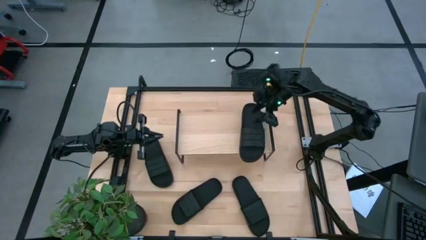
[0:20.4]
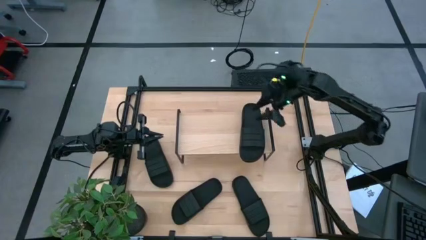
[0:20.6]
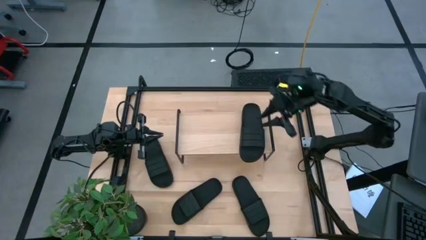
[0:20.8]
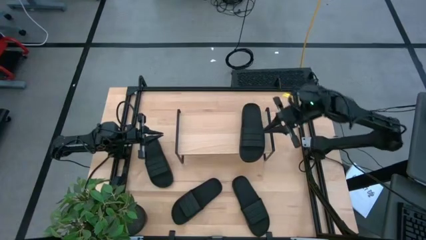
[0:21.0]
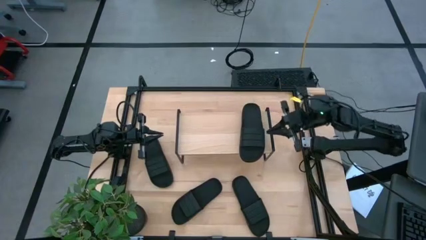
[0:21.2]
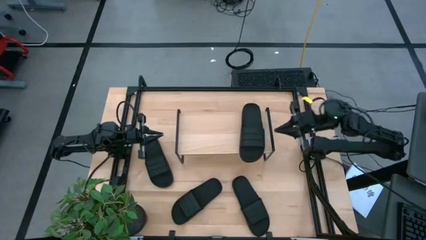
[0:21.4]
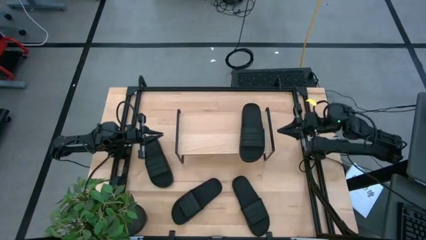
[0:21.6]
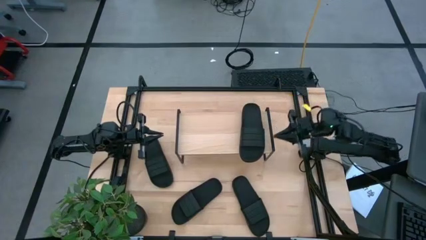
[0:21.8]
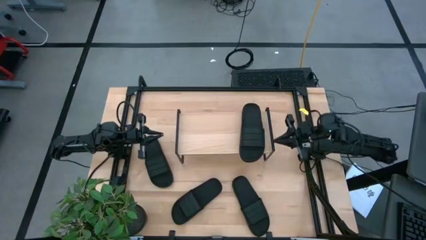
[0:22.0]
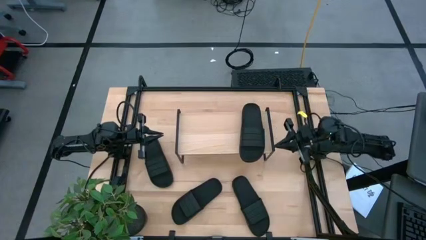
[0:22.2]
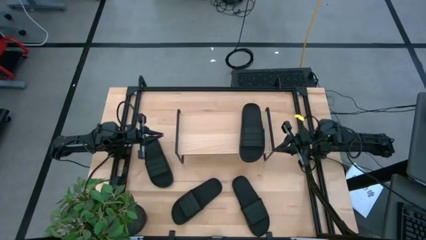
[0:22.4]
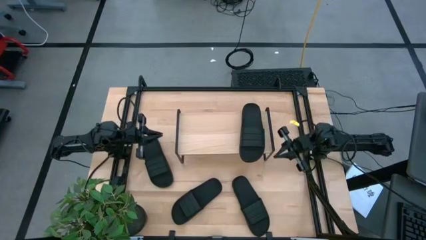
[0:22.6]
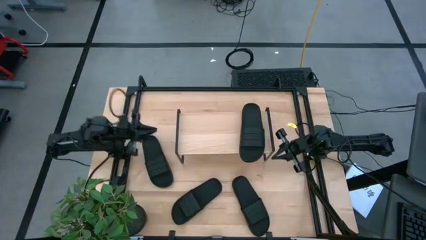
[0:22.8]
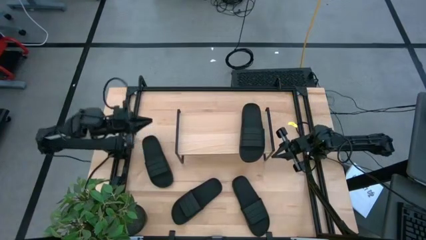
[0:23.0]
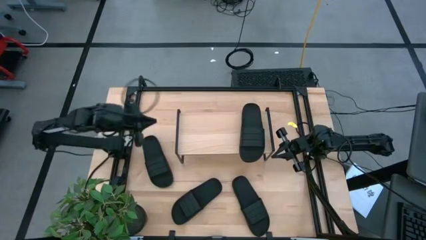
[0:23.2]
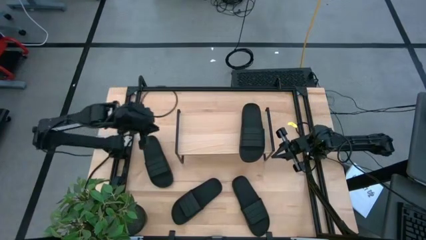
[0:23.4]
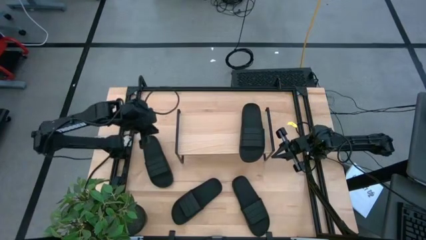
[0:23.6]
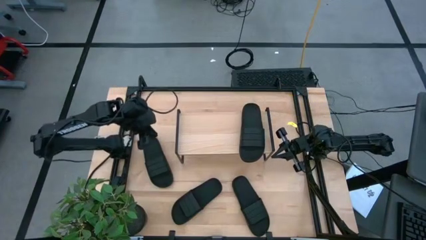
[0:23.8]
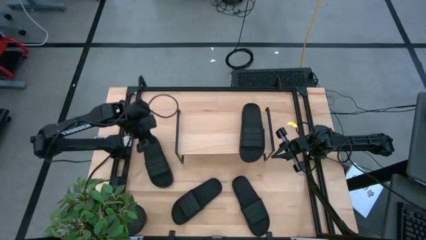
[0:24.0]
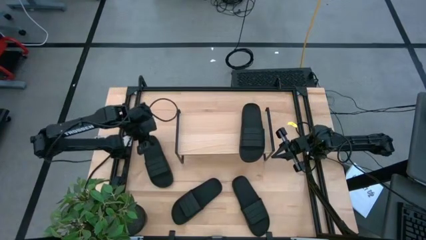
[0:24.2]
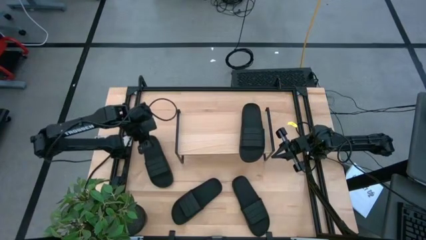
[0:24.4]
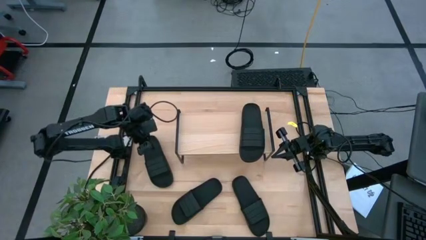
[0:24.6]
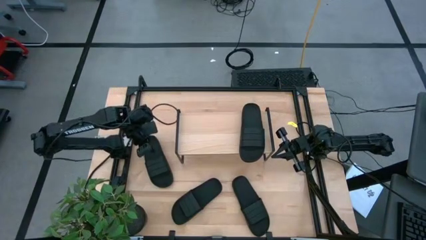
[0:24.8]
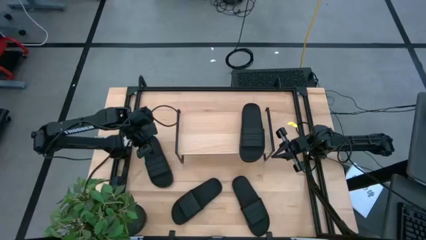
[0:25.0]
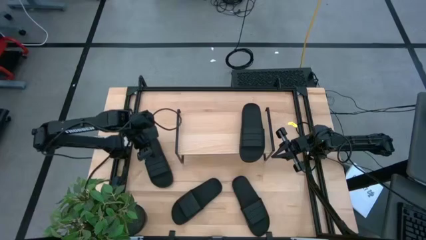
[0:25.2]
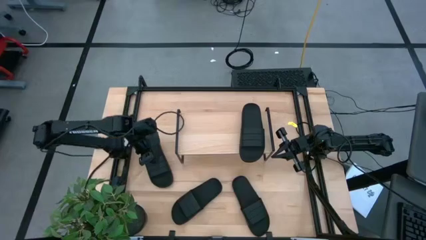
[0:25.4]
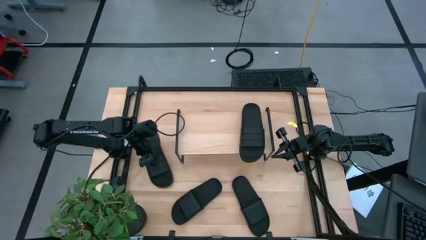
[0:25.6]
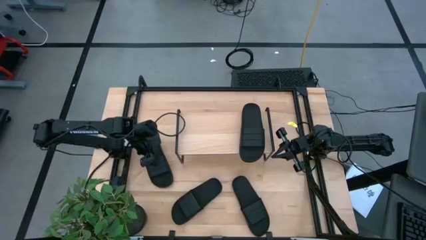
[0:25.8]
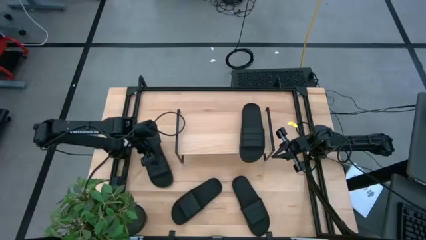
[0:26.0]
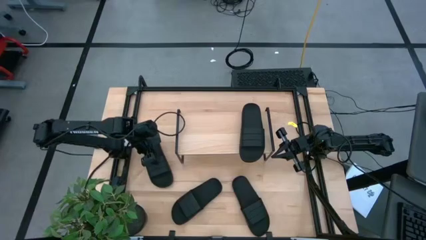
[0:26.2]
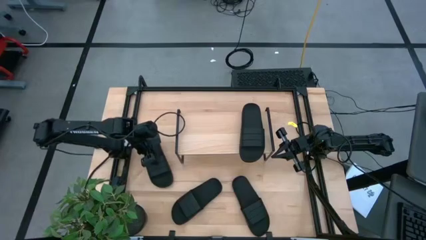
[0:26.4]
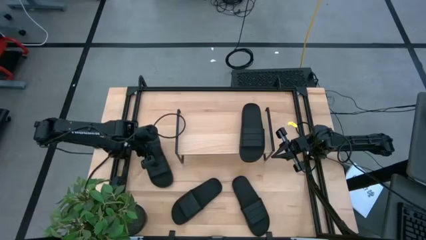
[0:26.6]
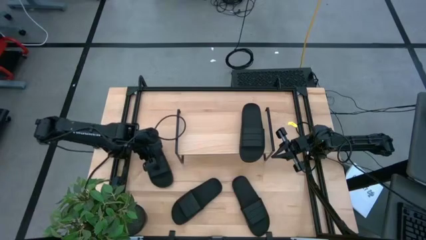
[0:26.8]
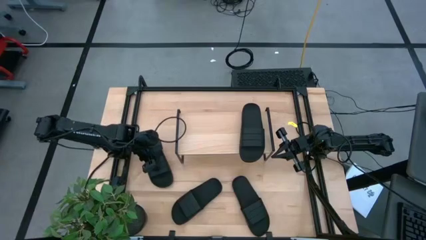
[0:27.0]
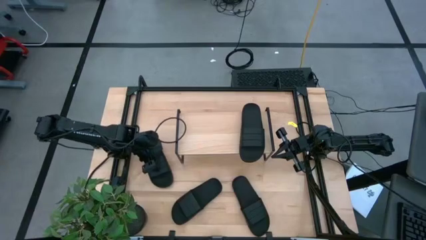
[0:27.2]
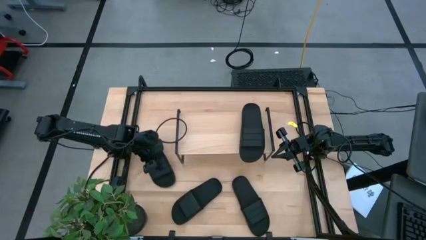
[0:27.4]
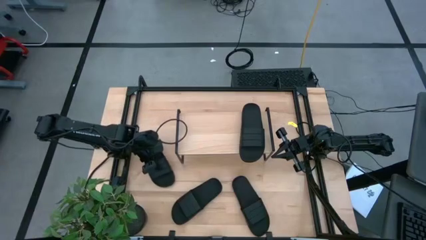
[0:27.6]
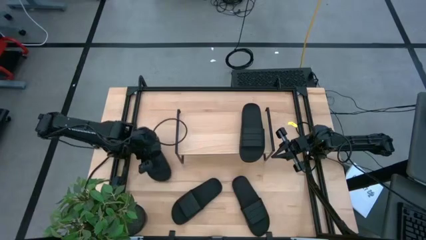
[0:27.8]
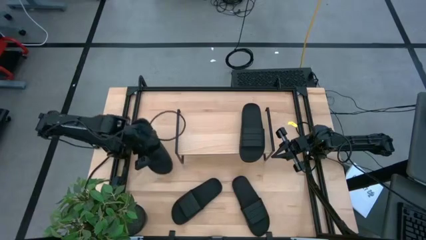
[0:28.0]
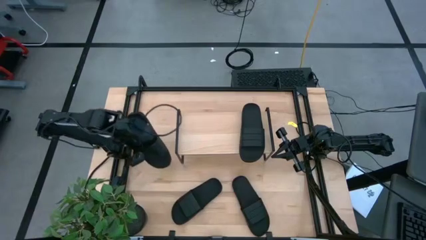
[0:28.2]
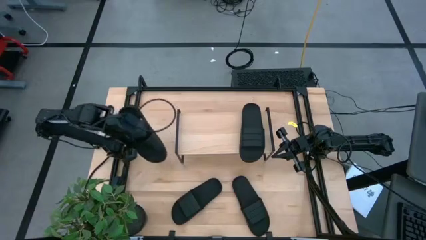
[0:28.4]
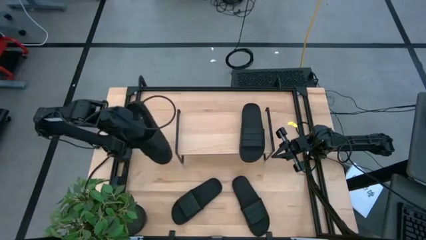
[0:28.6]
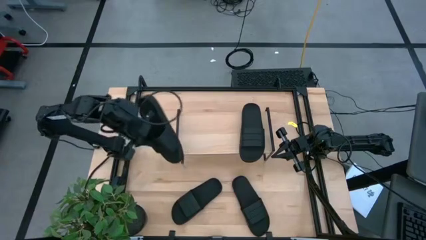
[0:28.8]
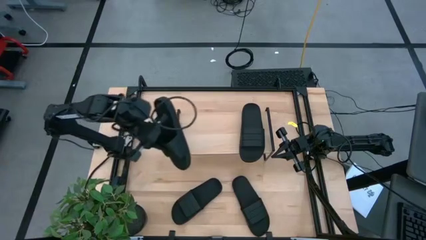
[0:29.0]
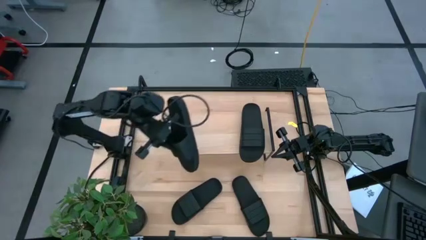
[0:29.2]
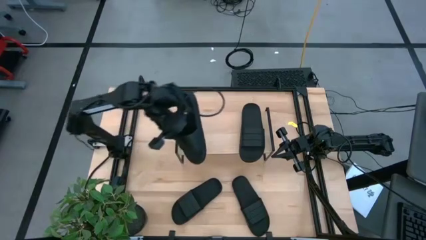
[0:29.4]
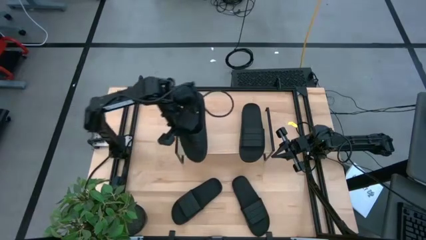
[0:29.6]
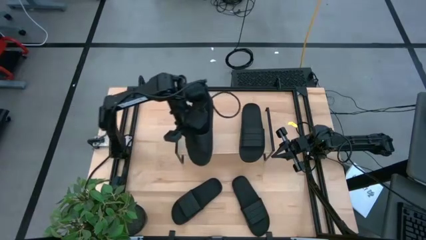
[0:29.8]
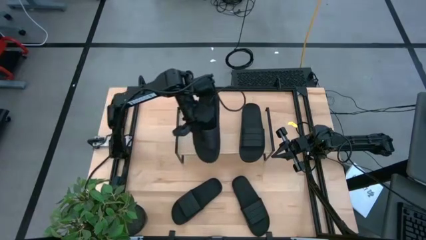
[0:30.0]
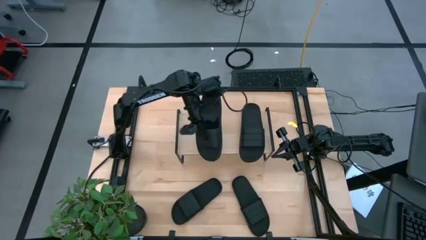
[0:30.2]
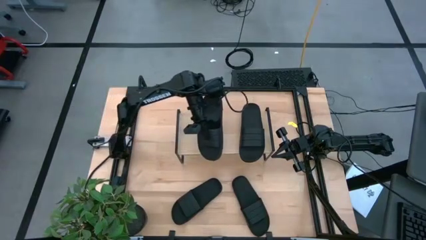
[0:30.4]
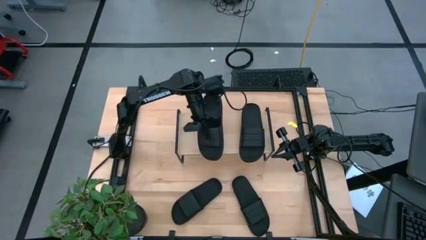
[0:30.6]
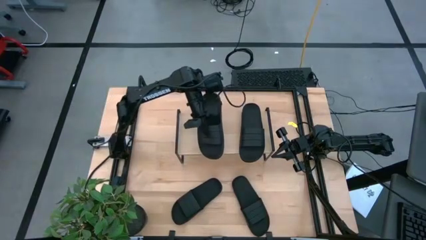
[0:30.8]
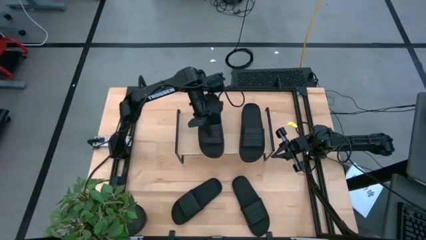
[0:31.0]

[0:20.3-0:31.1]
Task: Pick and place slides into the shelf
Put the left black slide on the shelf

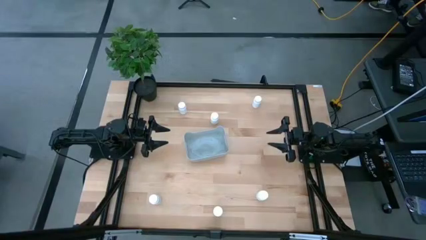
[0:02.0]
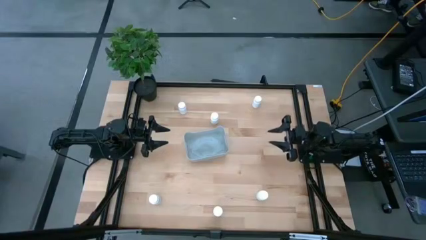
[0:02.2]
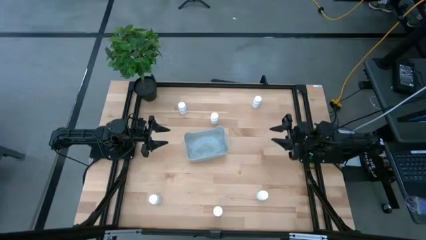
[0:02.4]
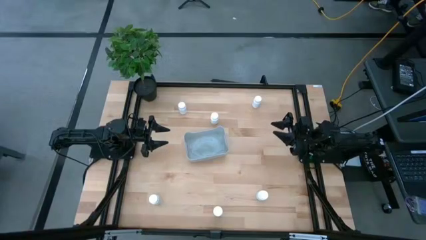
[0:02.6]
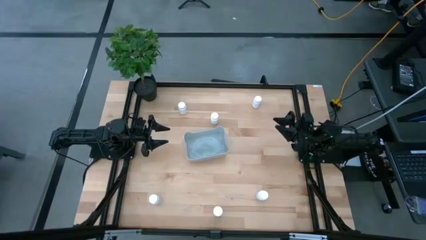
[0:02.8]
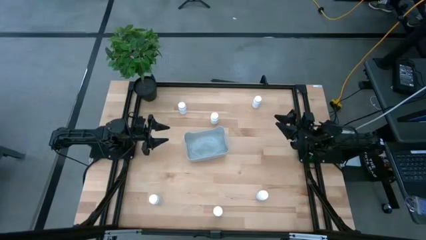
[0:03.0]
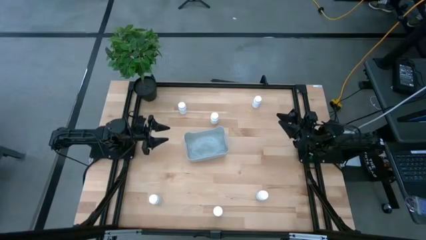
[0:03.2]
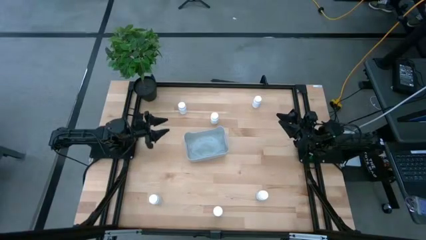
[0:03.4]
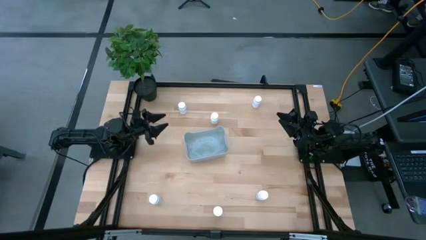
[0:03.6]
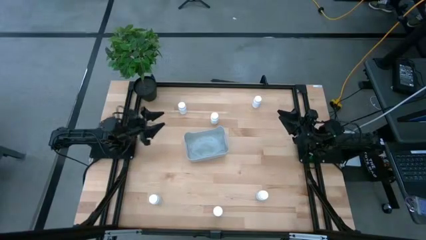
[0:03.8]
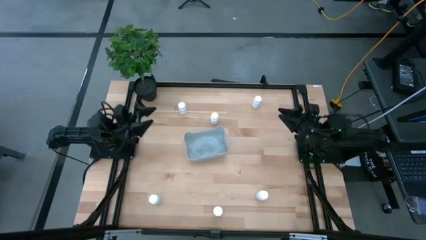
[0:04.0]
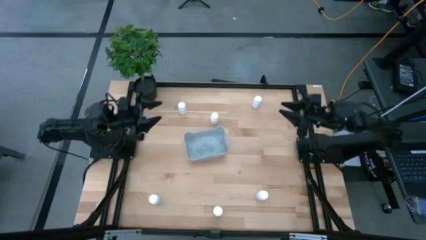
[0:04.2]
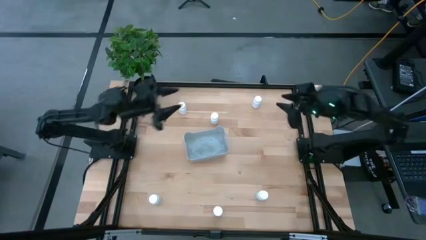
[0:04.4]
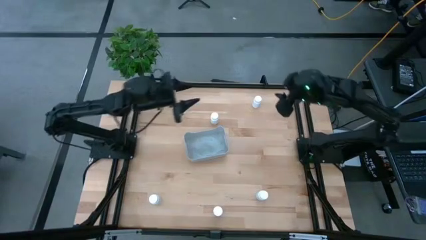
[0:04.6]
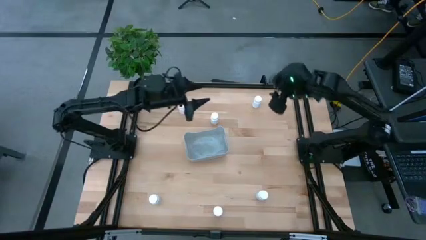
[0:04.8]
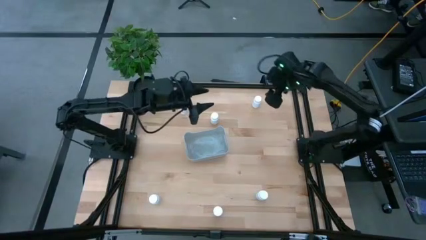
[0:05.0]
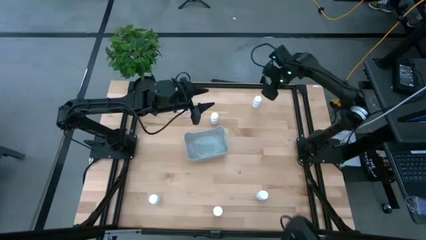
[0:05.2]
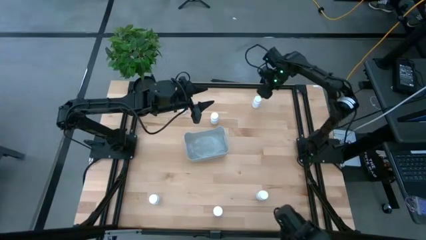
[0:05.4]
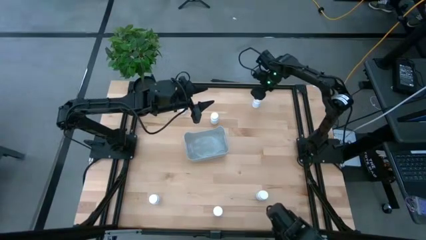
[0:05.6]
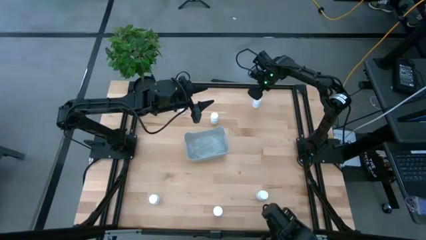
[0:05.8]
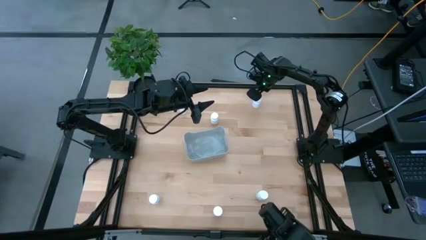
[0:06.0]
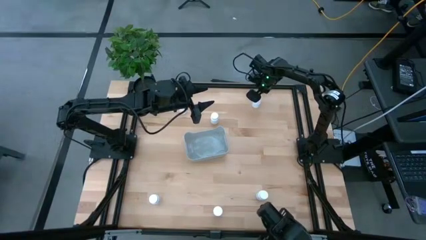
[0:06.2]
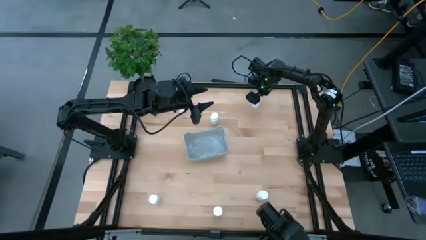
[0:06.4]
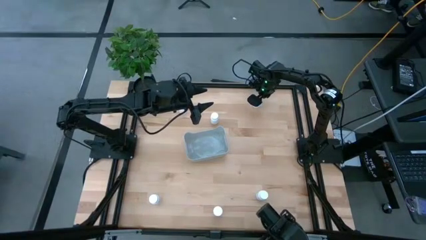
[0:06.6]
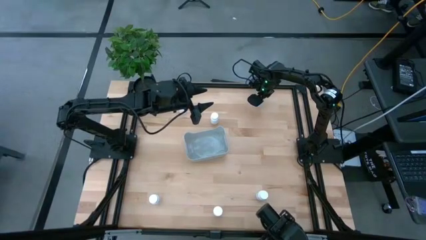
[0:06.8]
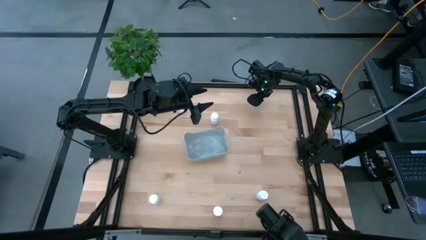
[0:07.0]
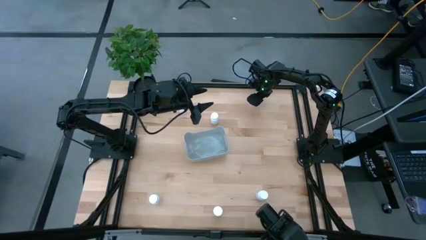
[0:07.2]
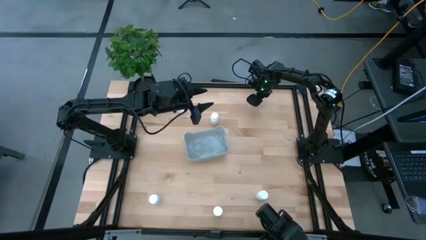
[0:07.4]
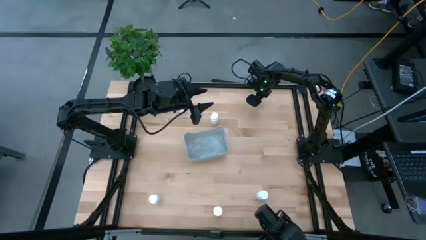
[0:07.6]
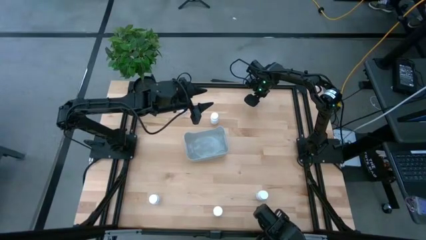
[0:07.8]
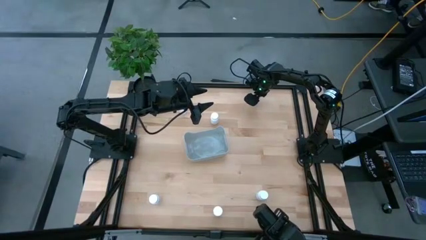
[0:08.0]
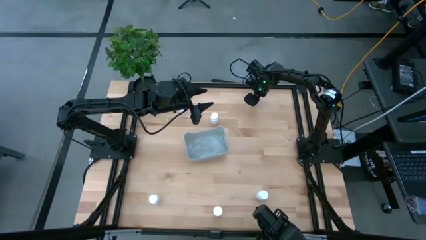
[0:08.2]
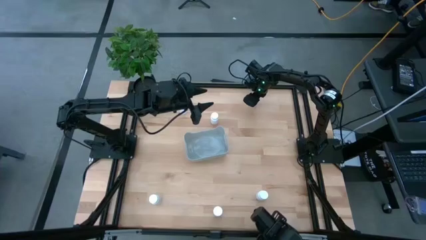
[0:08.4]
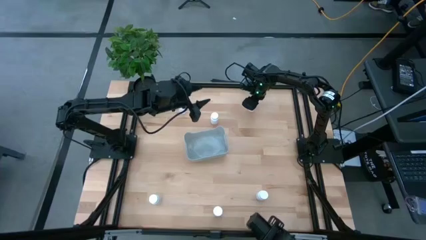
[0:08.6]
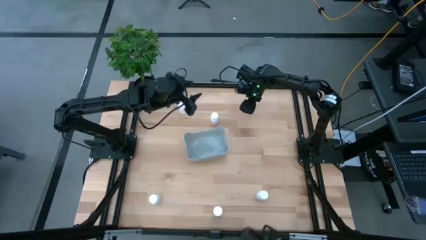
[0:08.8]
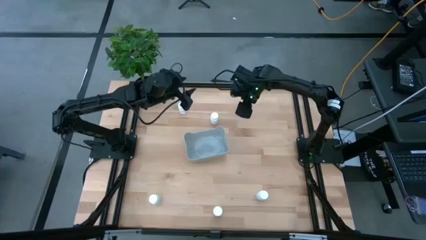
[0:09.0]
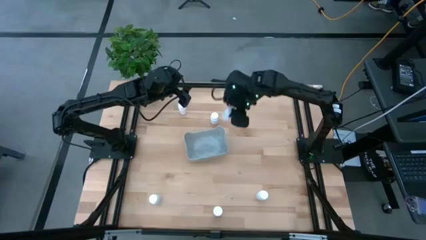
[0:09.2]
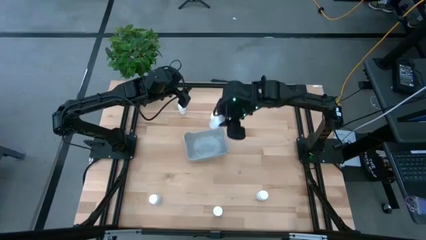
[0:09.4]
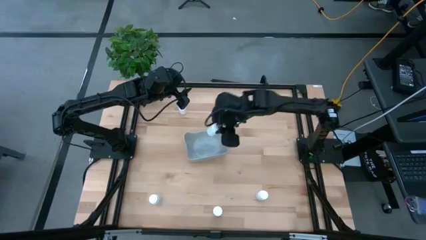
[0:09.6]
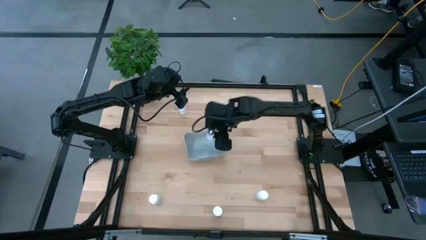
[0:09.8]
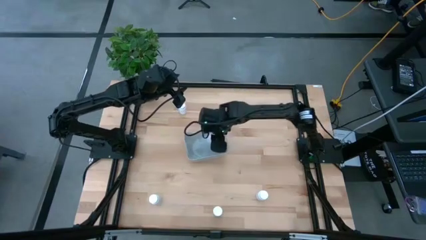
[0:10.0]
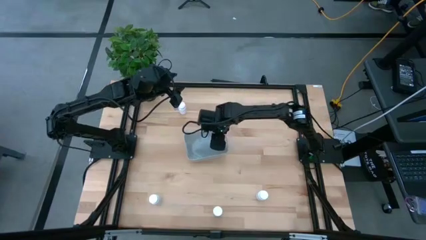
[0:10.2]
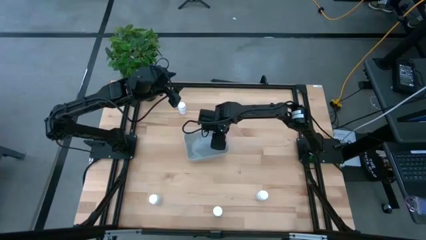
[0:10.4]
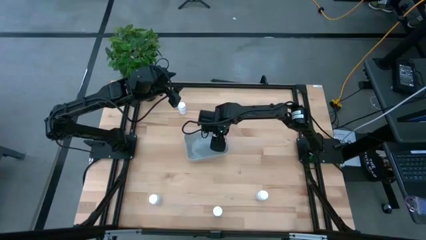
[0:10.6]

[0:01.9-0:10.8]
Task: Pick and place pill bottles into a basket
Put the white pill bottle into the gray basket
